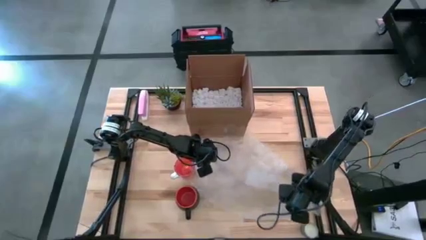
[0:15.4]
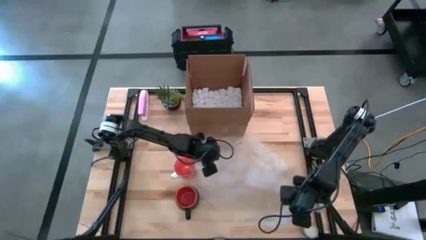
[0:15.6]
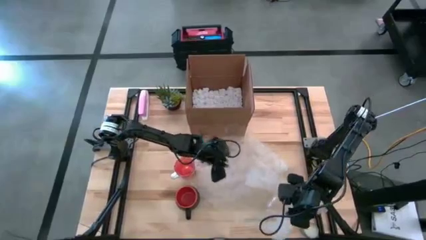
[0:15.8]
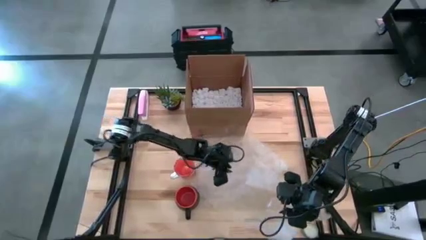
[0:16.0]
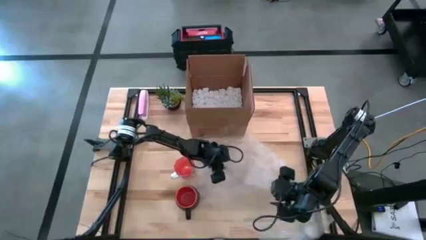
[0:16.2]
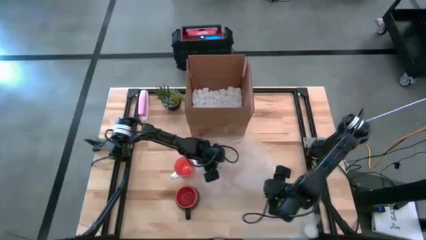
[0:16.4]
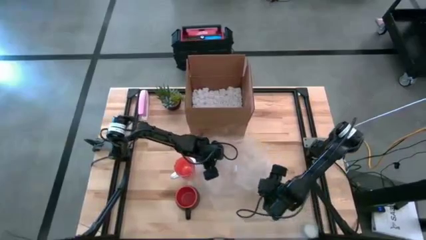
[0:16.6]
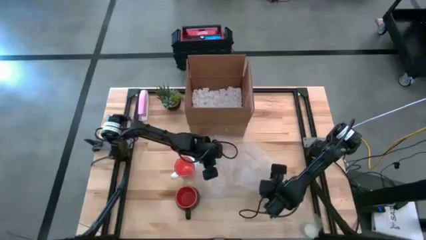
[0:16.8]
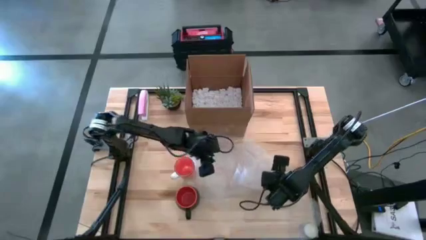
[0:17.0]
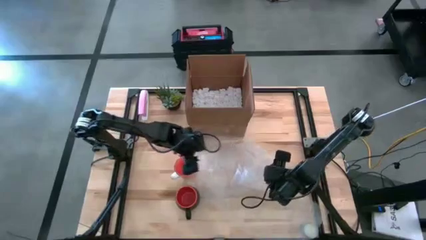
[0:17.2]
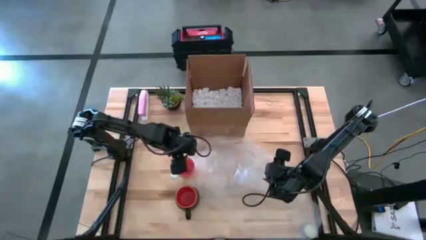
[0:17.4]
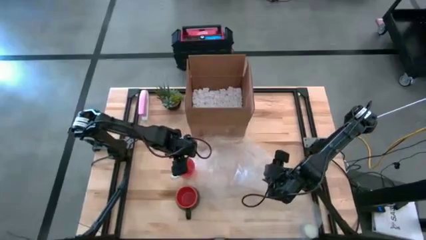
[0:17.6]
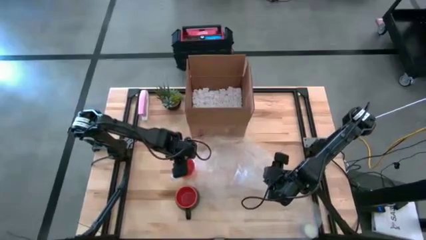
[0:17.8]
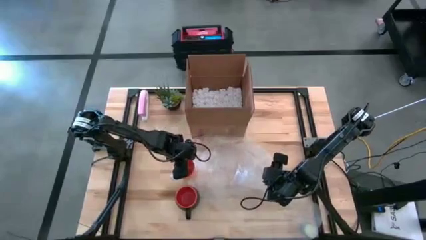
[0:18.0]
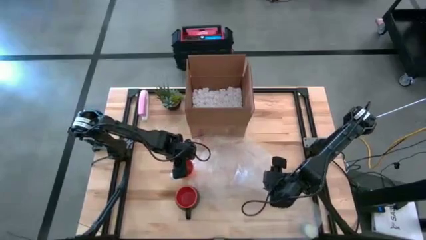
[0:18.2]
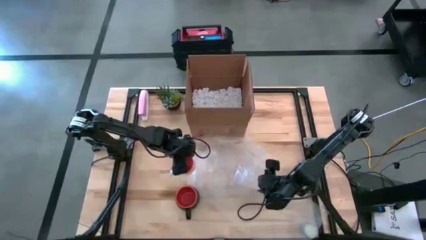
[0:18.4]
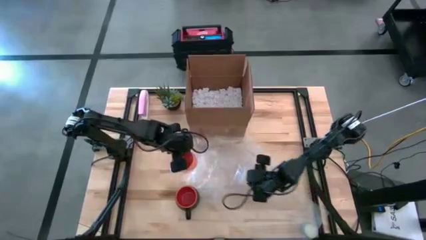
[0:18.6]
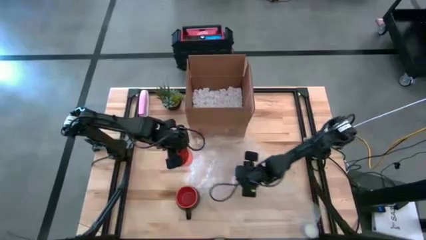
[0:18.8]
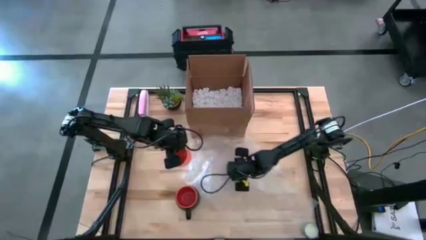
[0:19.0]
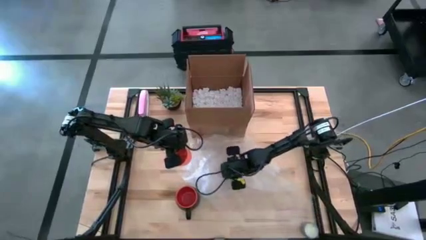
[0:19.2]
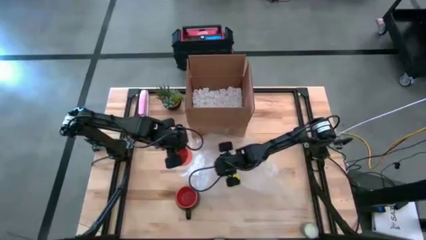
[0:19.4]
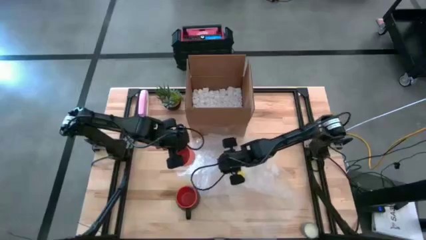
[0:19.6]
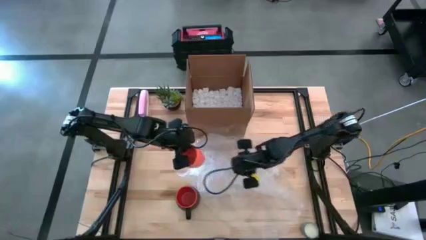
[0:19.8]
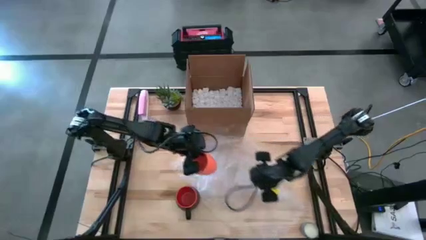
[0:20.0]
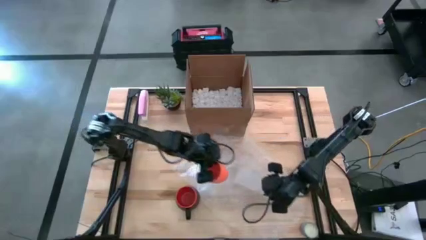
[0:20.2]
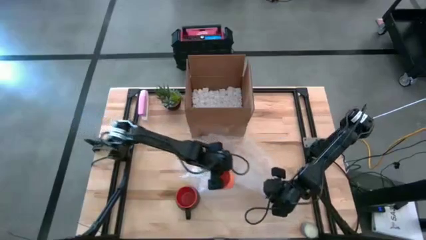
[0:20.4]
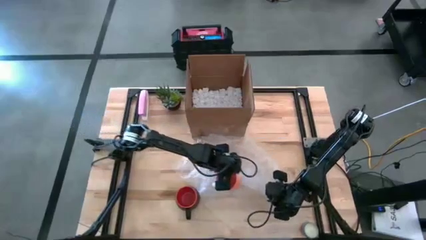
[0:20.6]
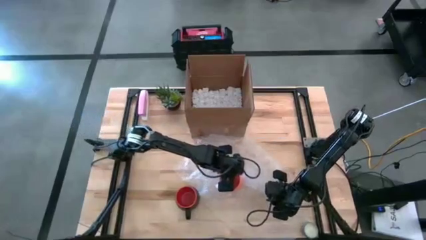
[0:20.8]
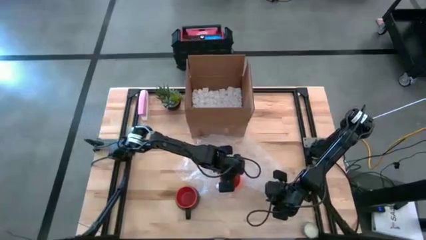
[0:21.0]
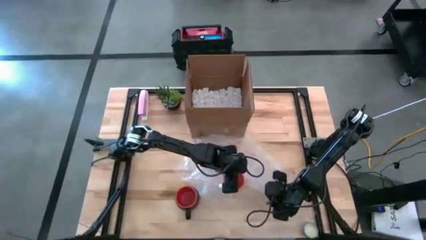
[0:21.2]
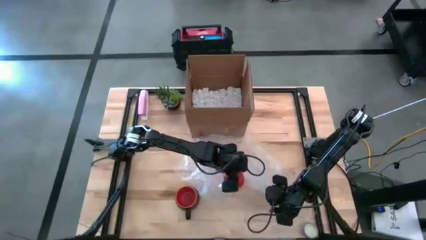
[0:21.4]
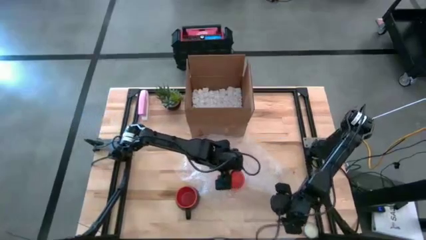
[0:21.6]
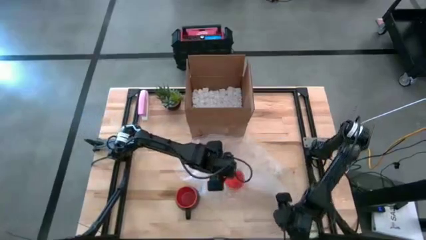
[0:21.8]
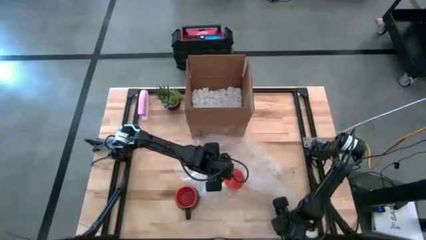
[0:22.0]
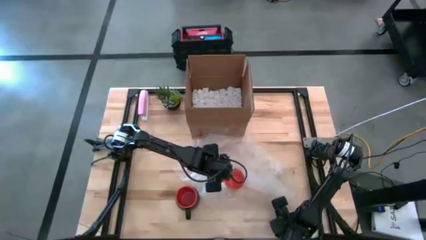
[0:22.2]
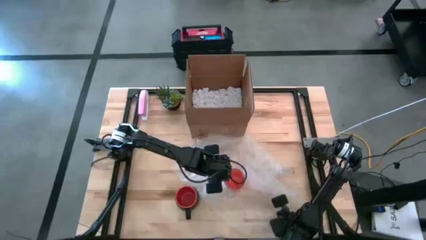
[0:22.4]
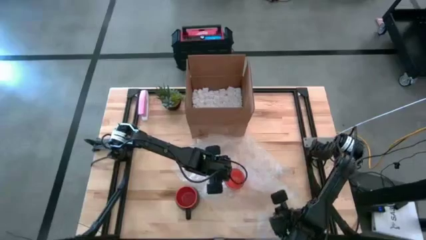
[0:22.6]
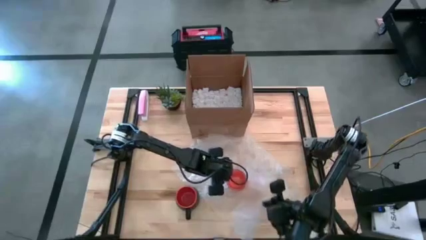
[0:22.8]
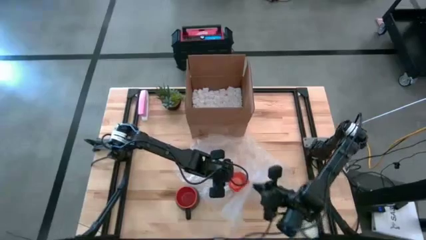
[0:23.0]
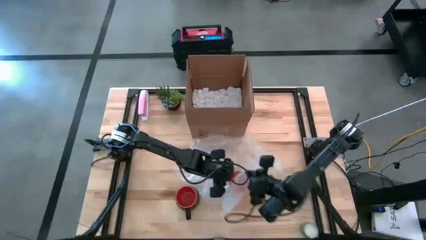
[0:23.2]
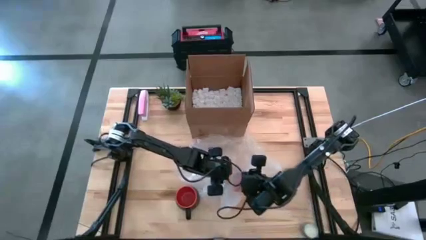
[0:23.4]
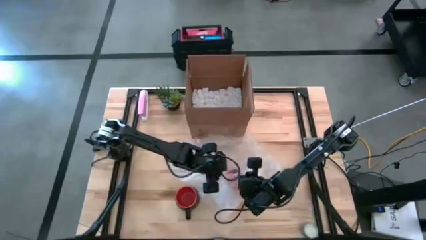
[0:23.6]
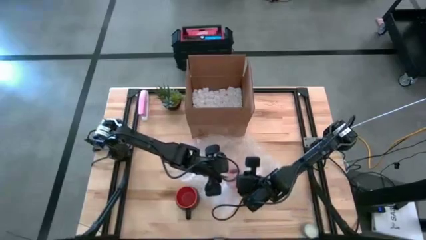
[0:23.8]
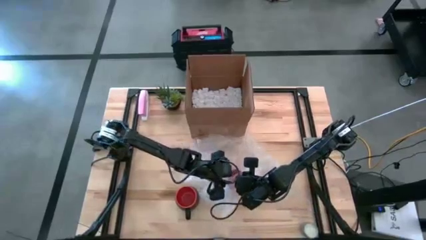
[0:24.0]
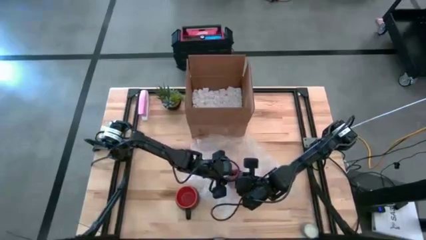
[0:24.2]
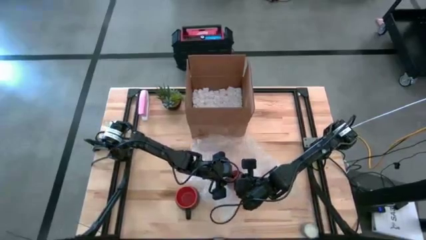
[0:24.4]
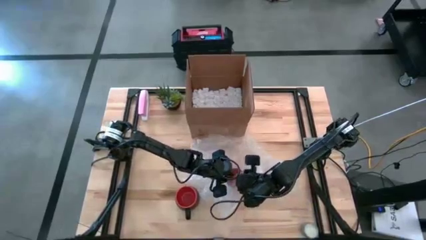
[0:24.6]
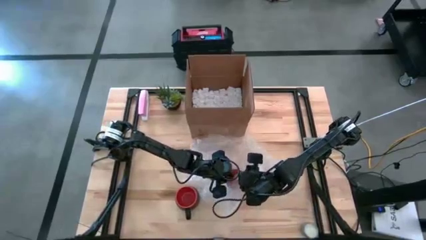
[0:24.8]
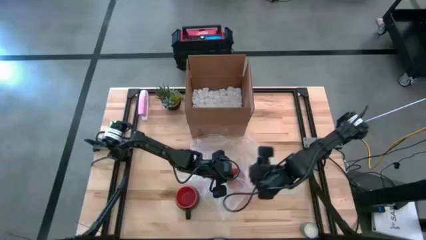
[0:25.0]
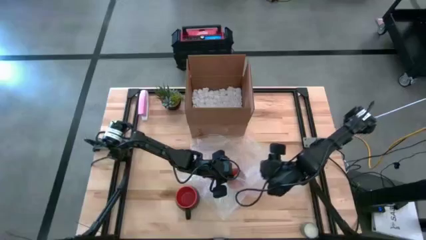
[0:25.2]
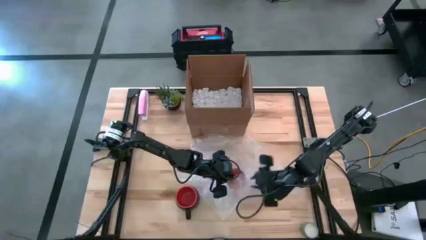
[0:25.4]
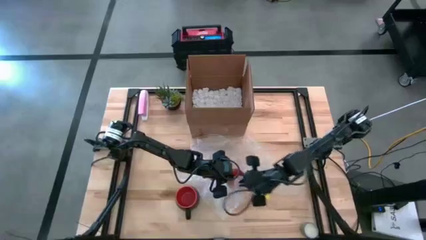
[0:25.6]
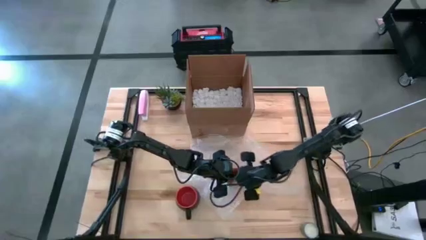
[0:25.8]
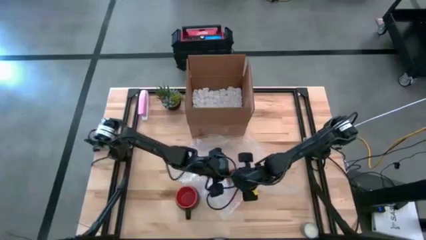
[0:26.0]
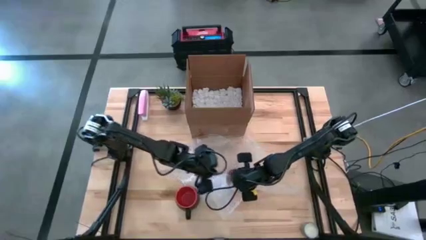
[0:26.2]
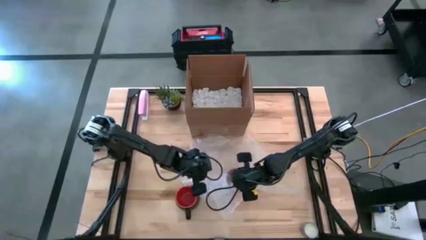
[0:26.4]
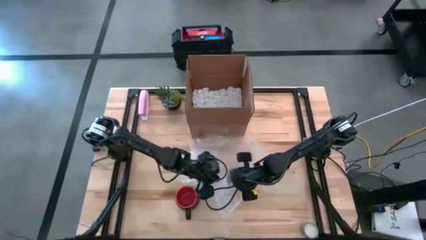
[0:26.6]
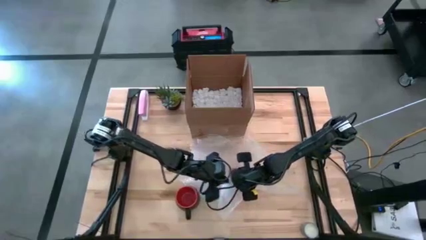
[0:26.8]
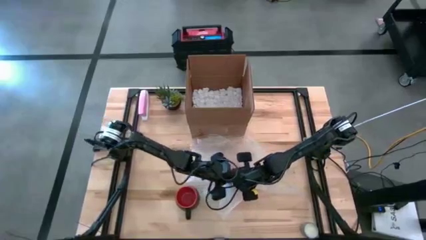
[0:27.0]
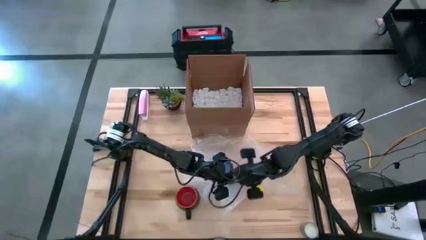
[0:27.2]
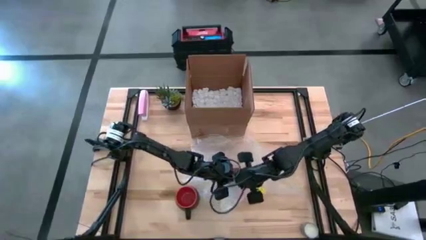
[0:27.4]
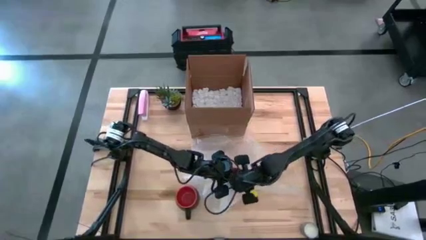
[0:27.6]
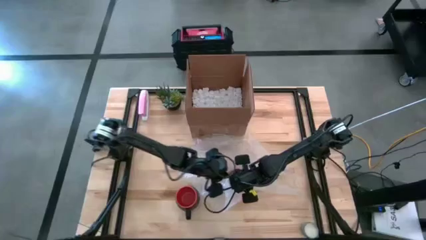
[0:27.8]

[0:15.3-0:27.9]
Task: wrap mug
Wrap the orange mug with the bubble wrap on top
